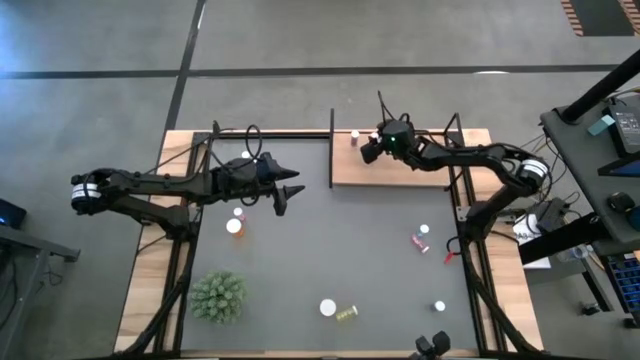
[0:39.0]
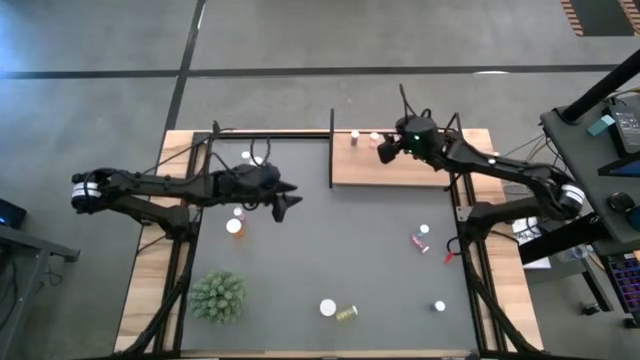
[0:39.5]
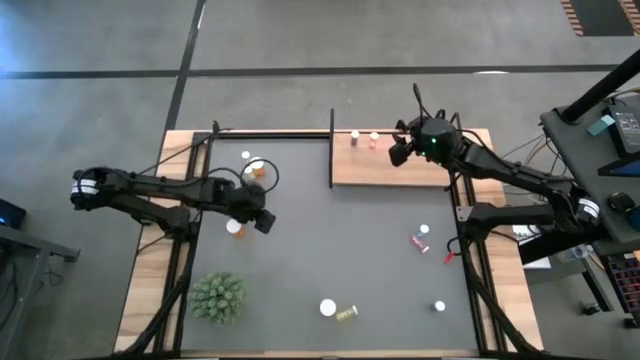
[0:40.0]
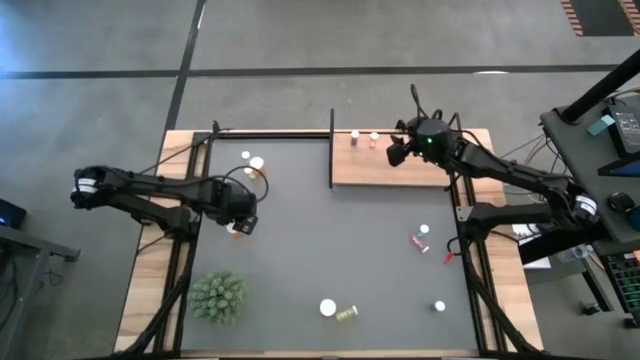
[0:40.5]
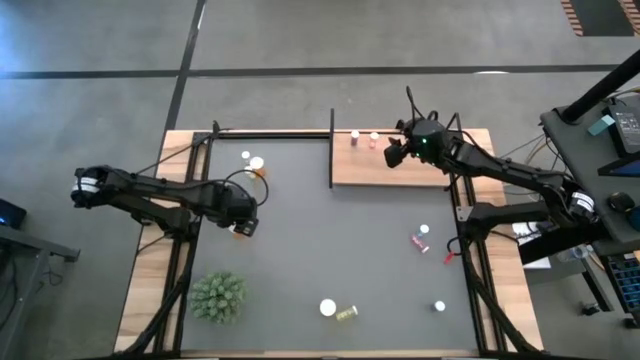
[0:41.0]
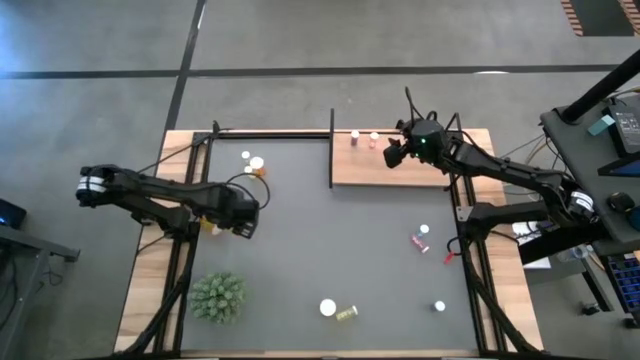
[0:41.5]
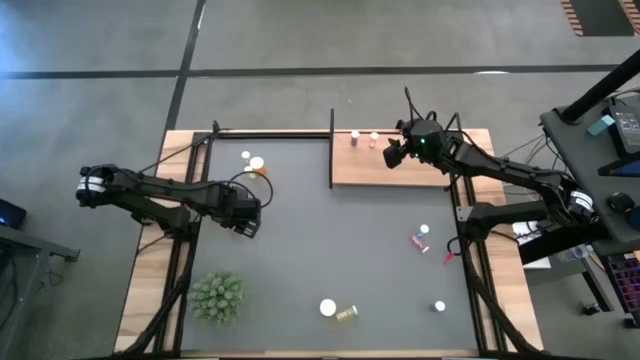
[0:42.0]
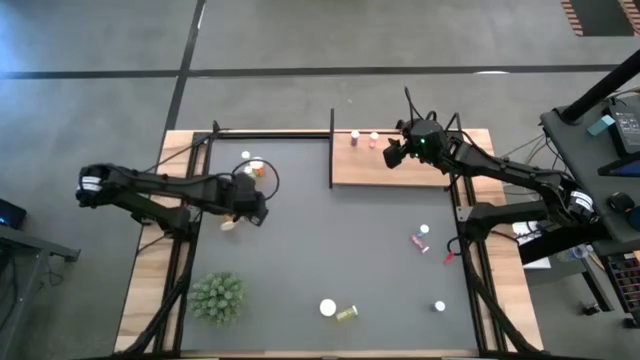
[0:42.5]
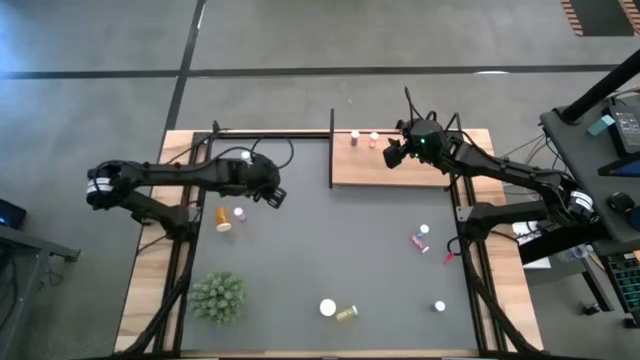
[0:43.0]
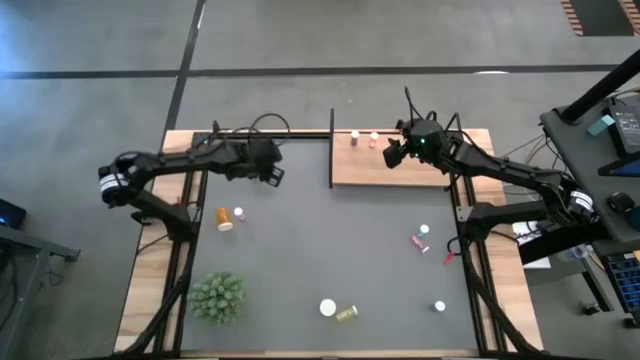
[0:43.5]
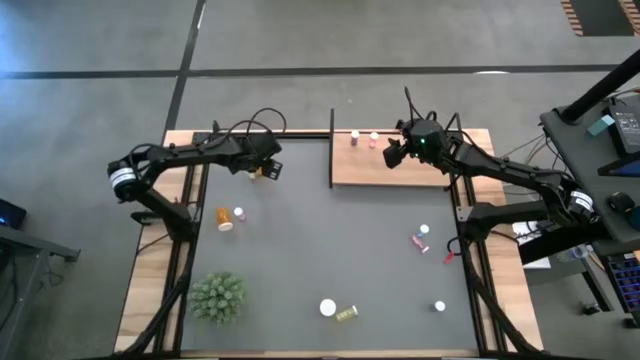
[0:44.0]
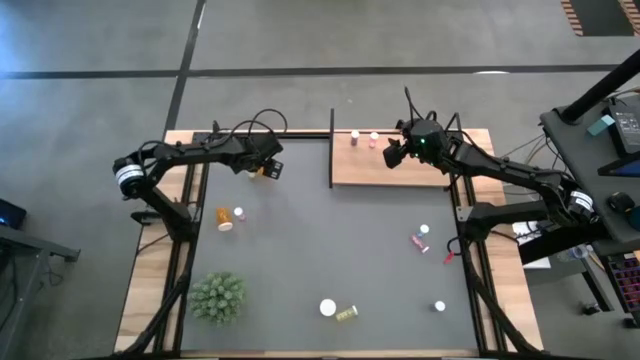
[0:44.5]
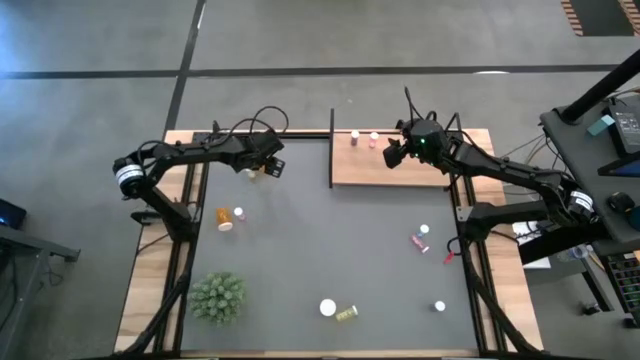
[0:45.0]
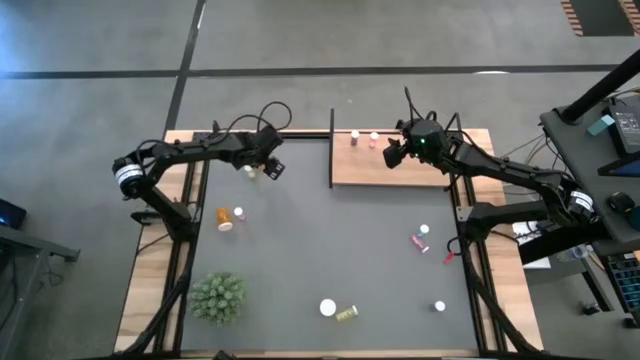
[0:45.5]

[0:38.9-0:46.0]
Task: Pick and place medicine bottles onto shelf by color
Put the middle orange pill bottle on the shelf

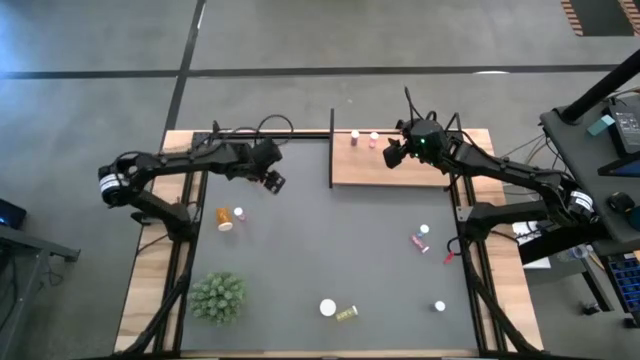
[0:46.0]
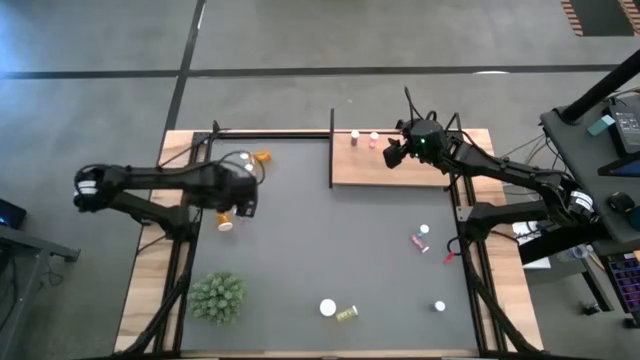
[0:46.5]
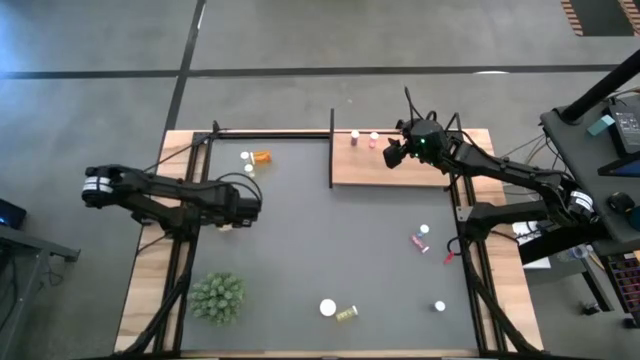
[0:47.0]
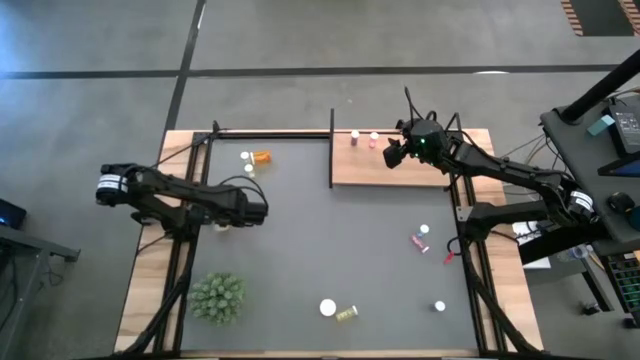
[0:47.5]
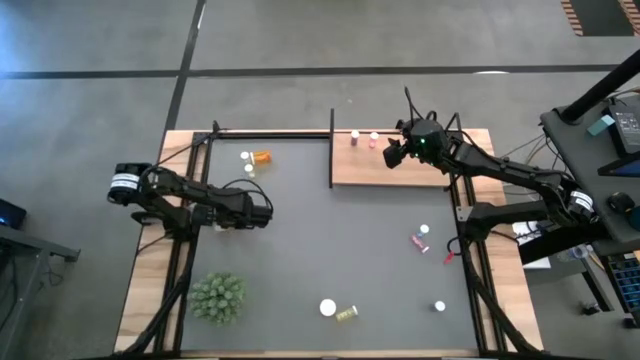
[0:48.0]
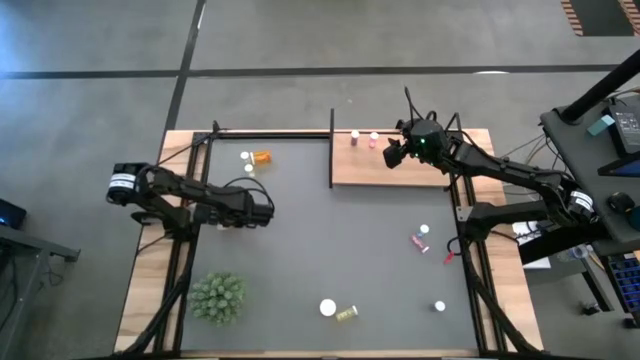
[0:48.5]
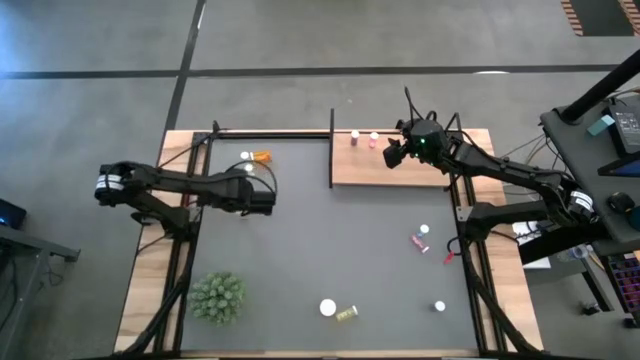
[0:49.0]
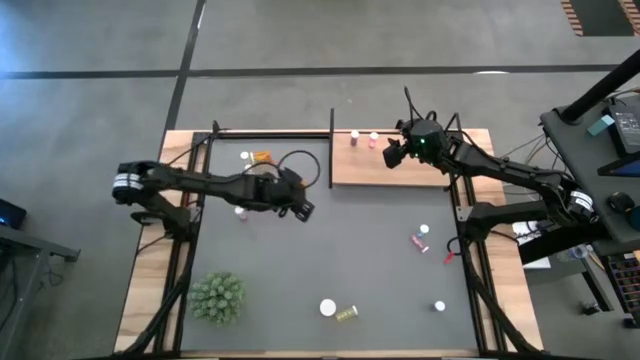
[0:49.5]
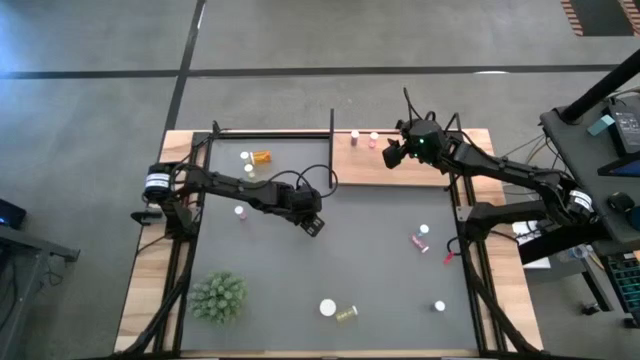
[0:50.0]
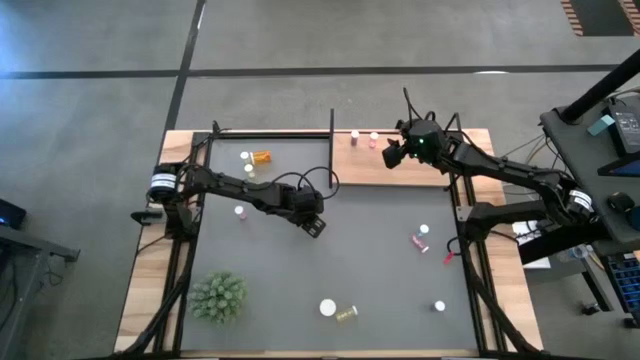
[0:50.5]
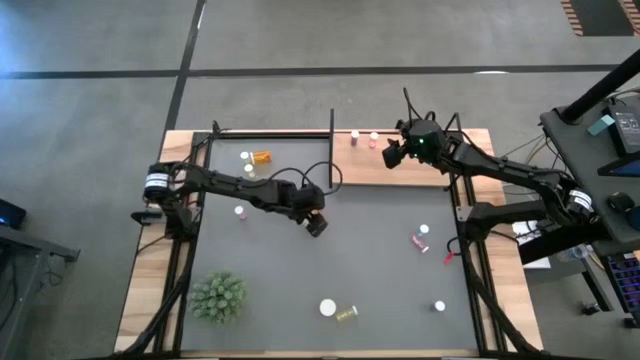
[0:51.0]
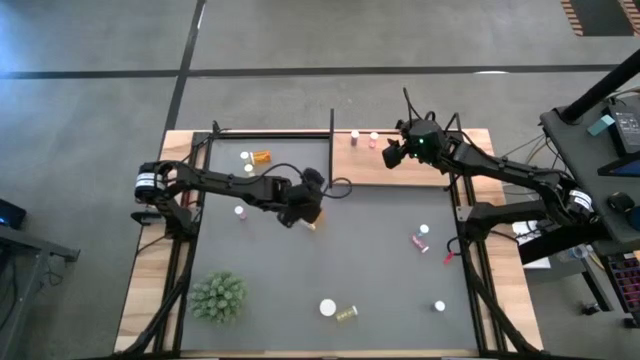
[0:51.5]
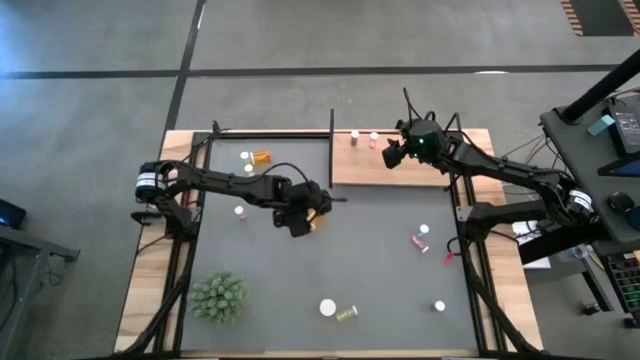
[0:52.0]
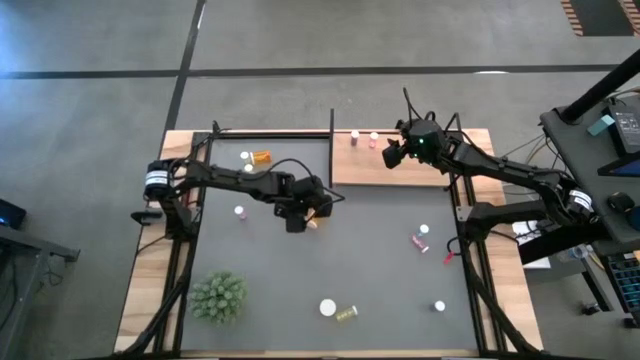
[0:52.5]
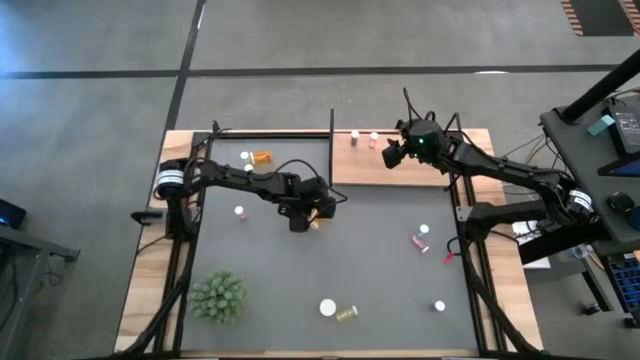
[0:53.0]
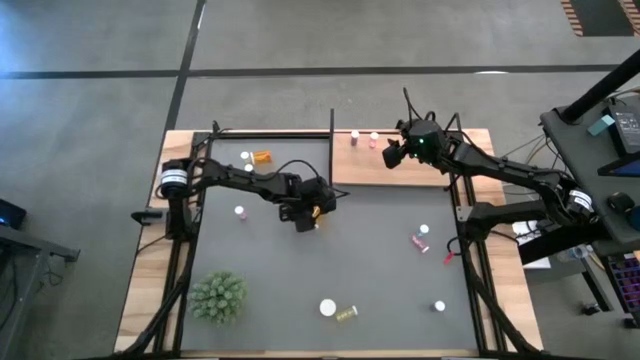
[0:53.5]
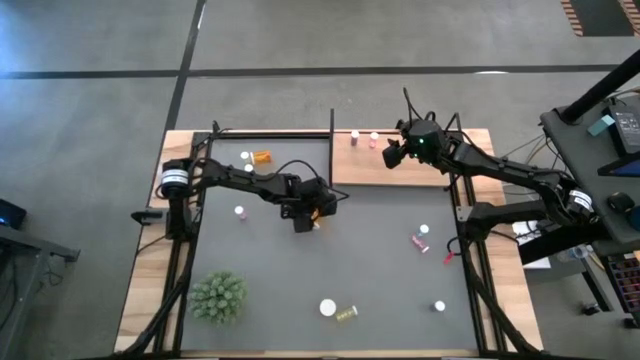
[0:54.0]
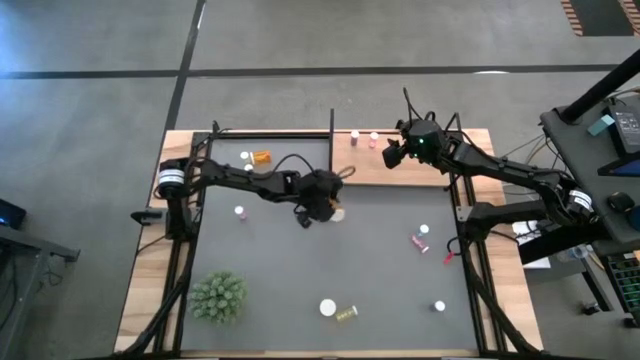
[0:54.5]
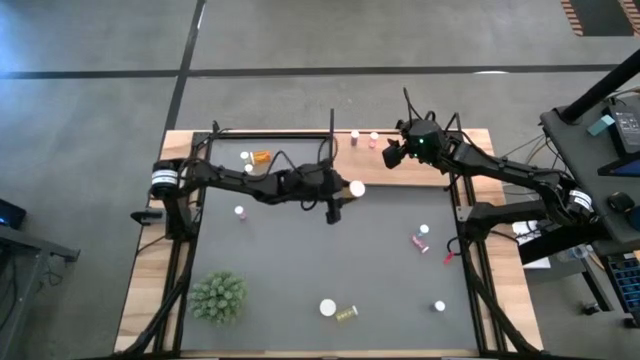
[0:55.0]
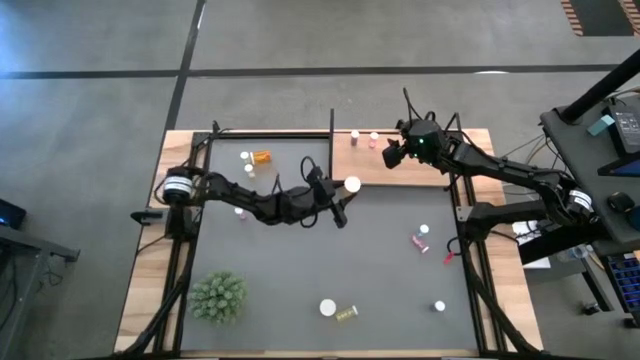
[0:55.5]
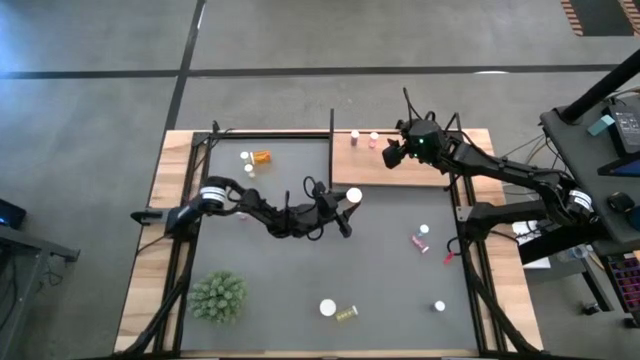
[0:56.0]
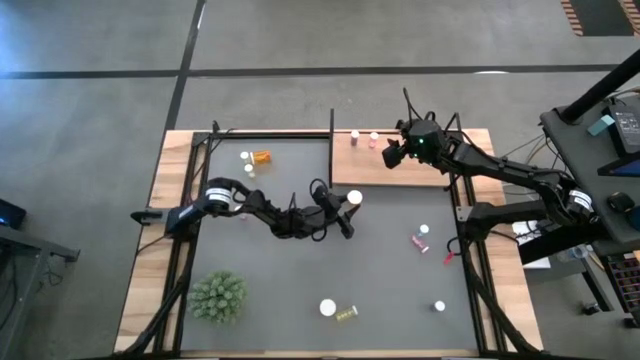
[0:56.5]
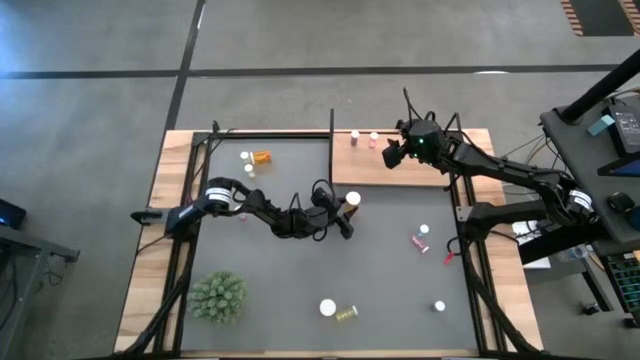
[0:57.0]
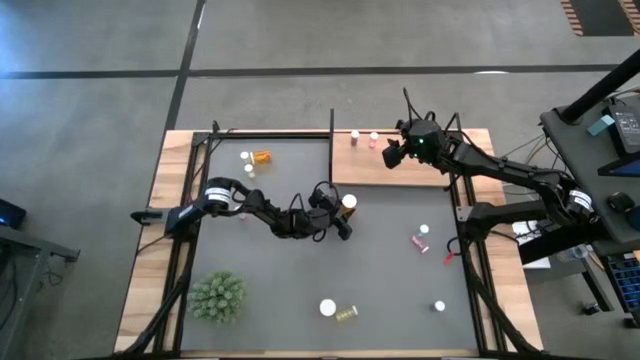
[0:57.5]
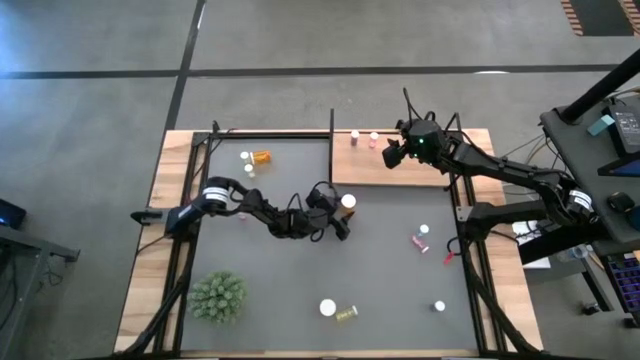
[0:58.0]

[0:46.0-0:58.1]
Move the middle orange pill bottle to the center of the table

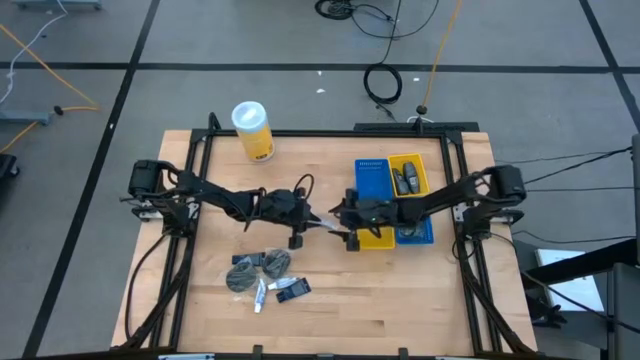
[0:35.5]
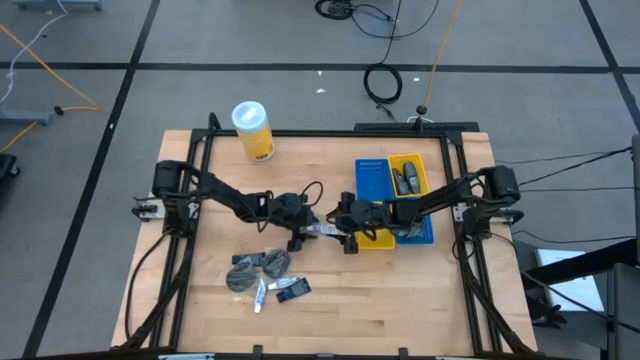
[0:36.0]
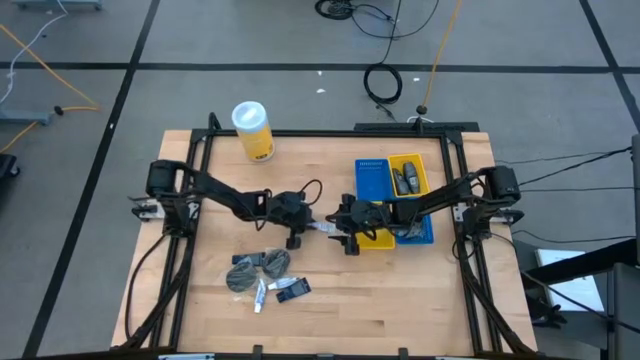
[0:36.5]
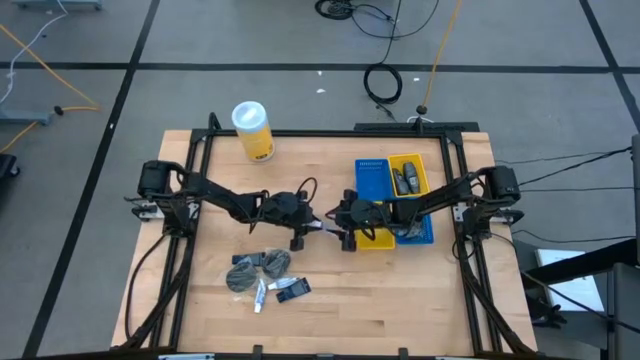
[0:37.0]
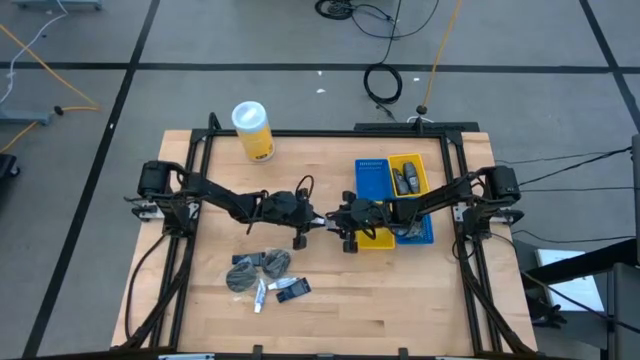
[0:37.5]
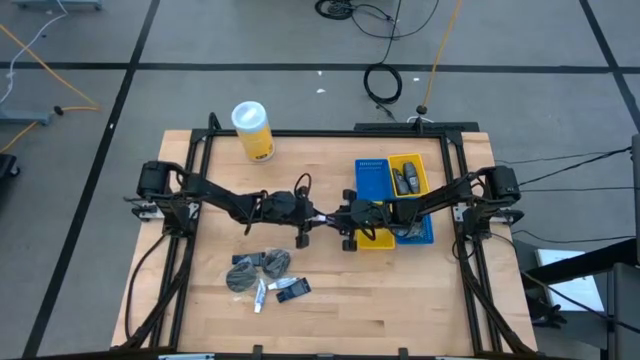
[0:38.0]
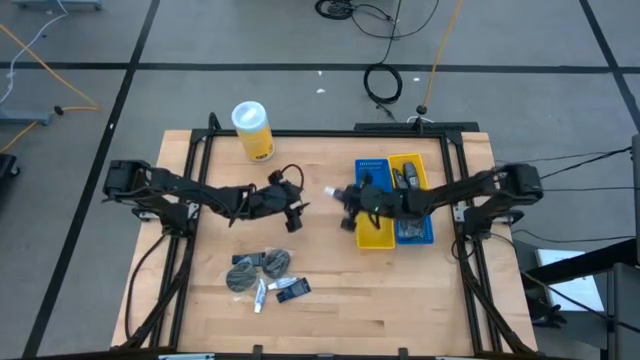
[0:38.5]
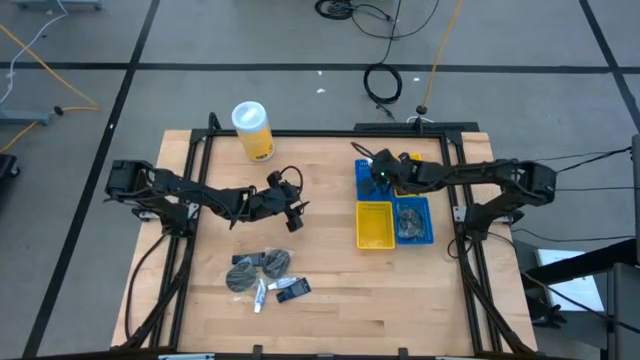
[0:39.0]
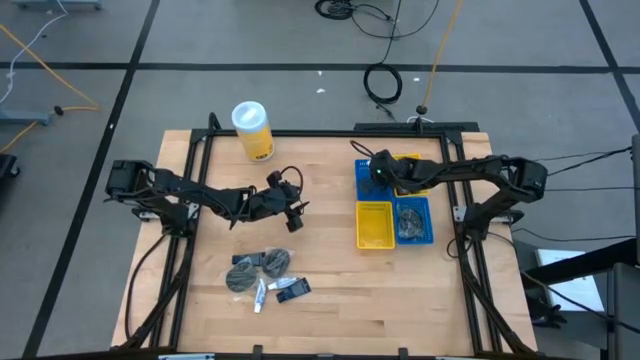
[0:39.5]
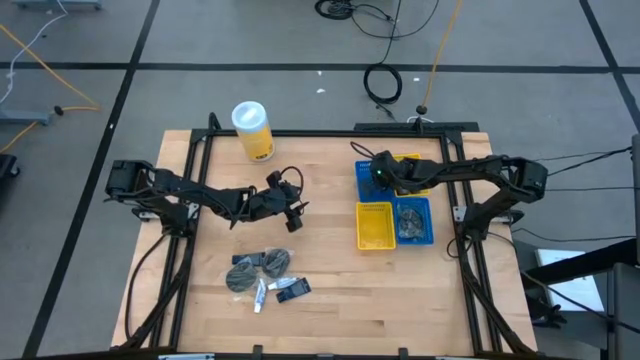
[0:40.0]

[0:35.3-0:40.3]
Task: Pick & Place Travel size toiletries
Put the white toothpaste into the top blue bin
